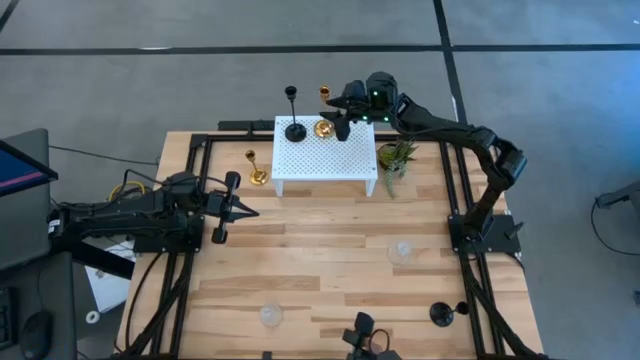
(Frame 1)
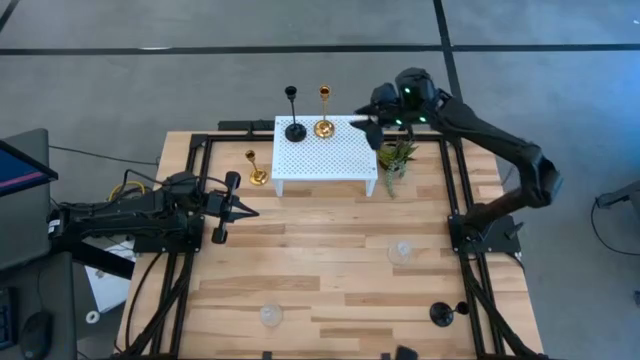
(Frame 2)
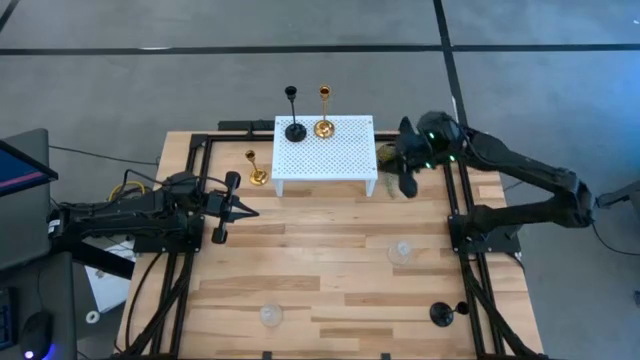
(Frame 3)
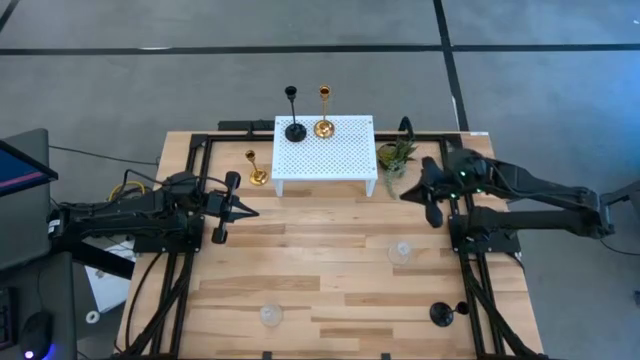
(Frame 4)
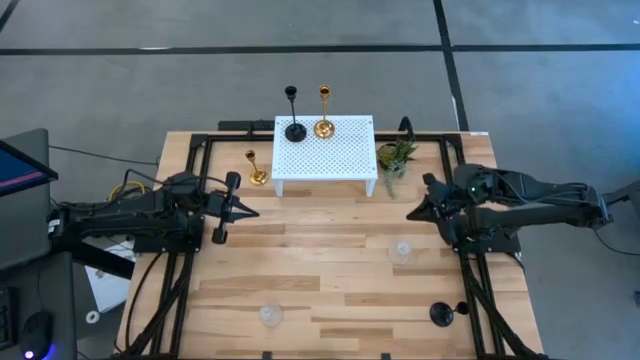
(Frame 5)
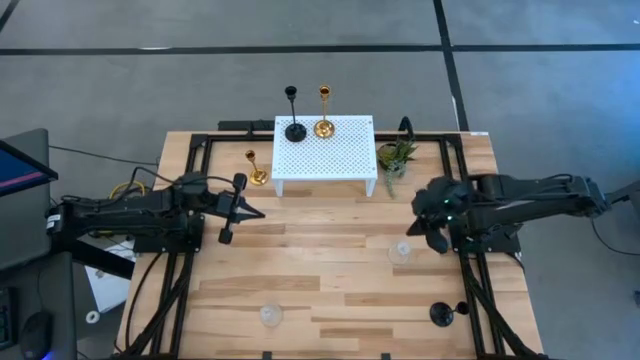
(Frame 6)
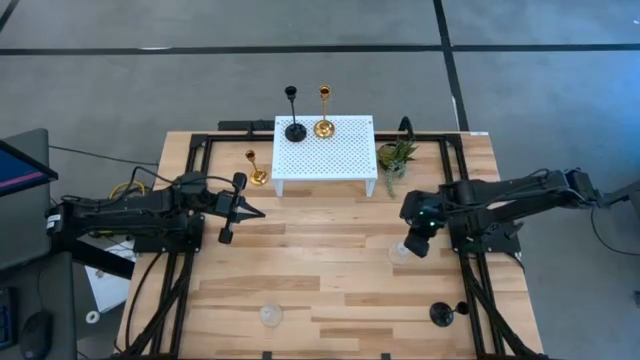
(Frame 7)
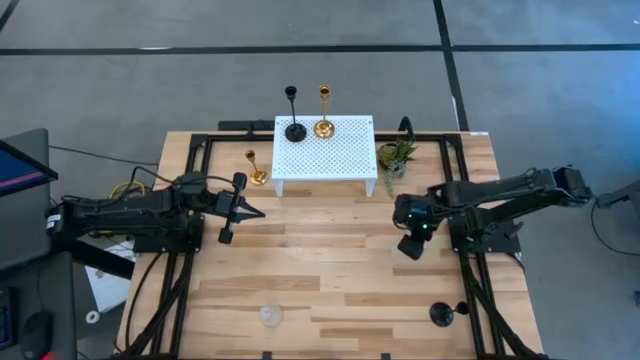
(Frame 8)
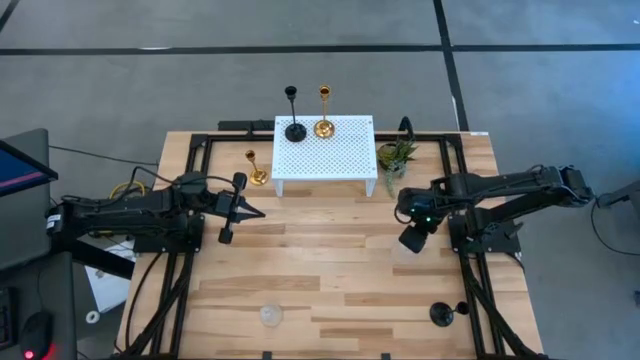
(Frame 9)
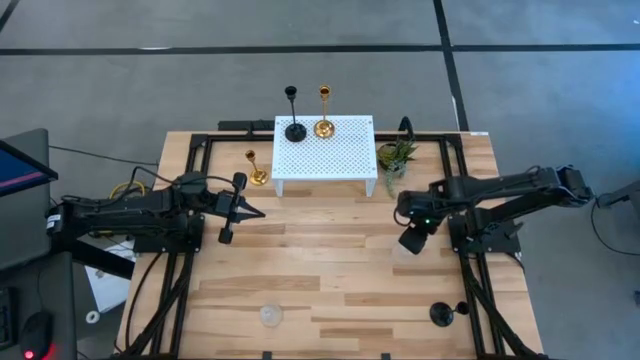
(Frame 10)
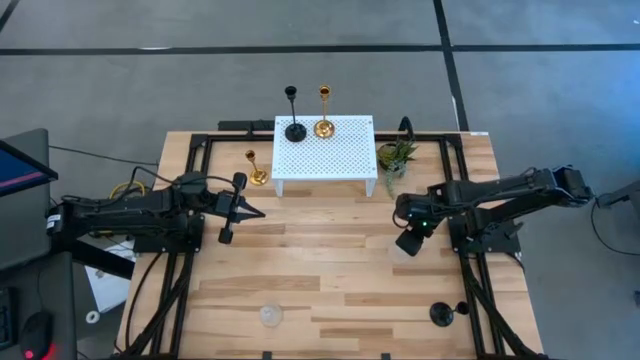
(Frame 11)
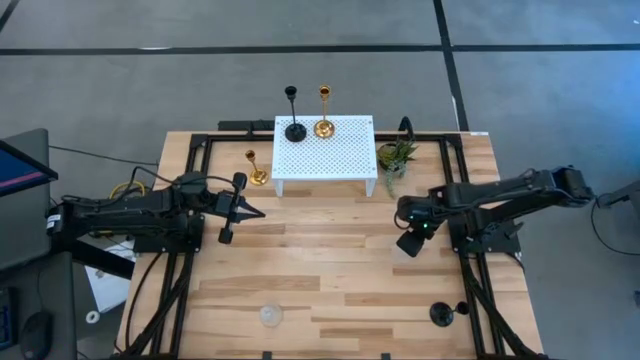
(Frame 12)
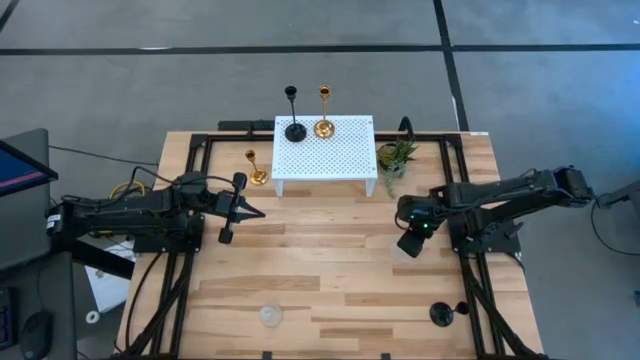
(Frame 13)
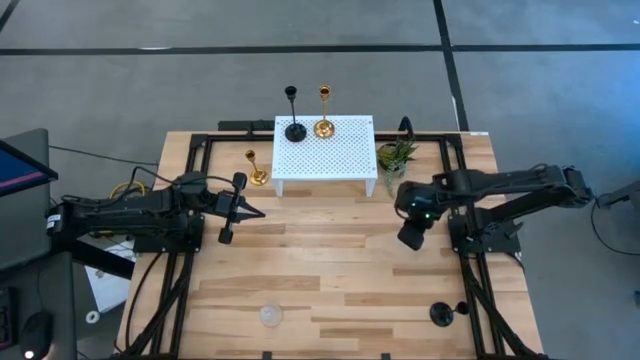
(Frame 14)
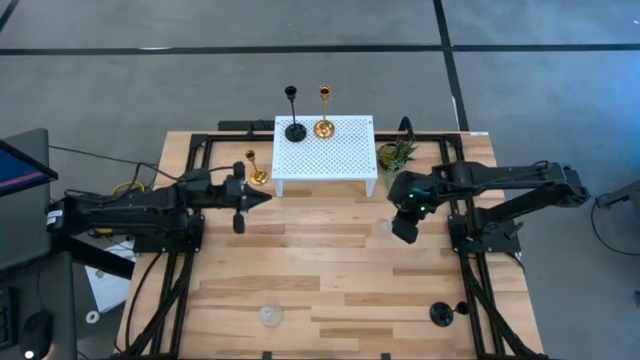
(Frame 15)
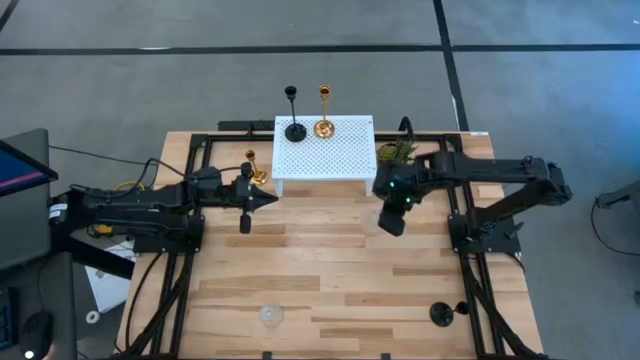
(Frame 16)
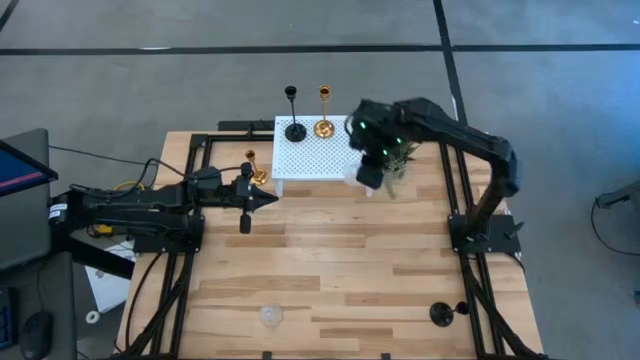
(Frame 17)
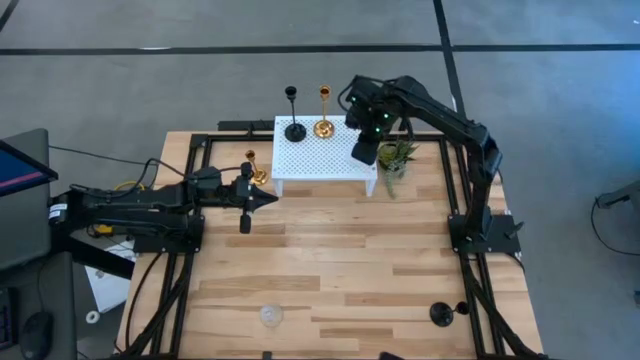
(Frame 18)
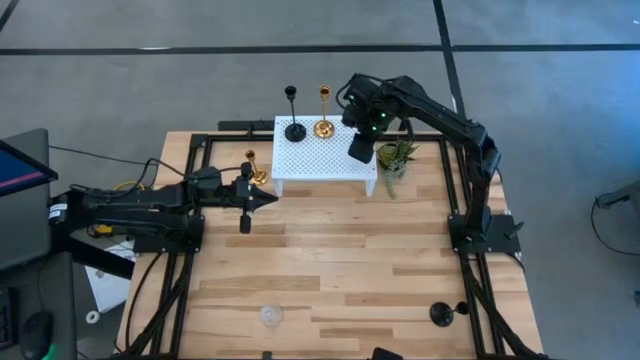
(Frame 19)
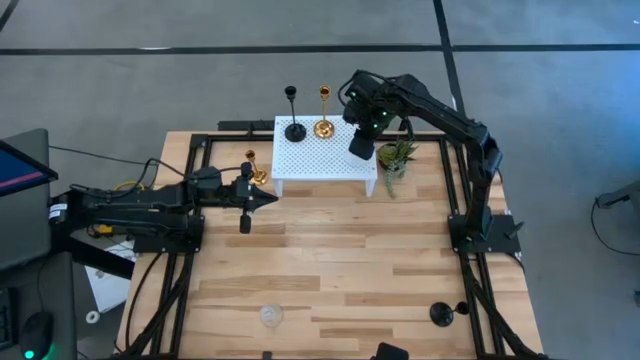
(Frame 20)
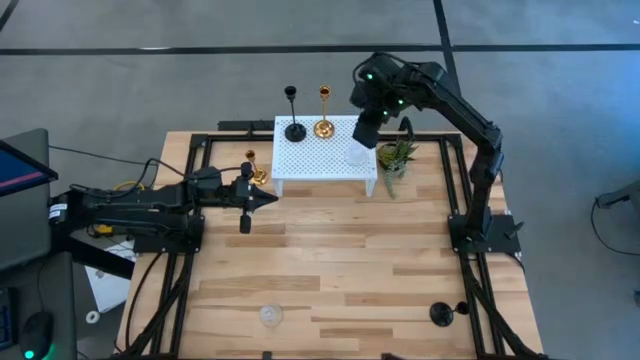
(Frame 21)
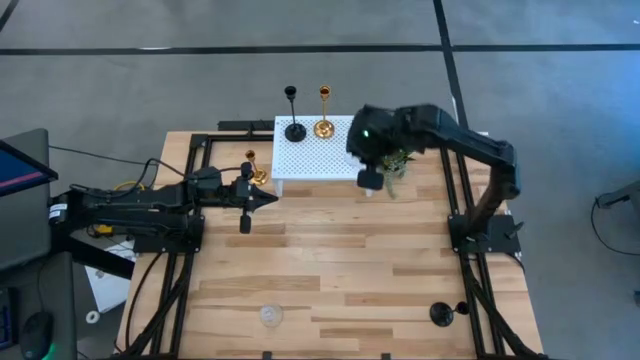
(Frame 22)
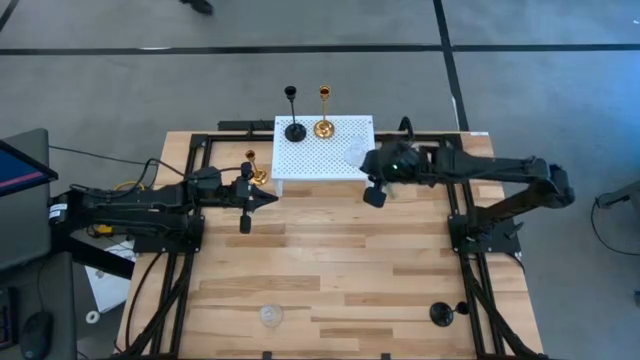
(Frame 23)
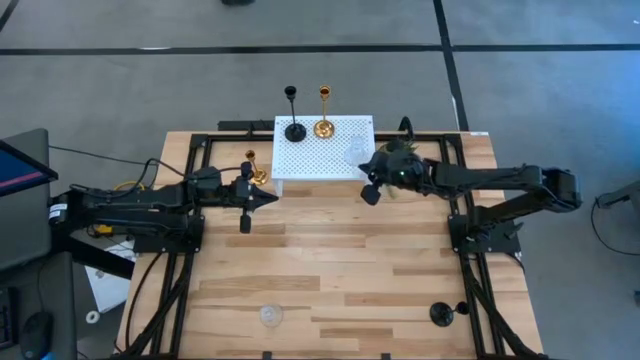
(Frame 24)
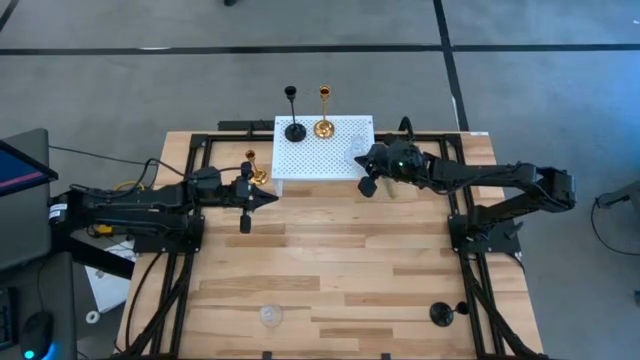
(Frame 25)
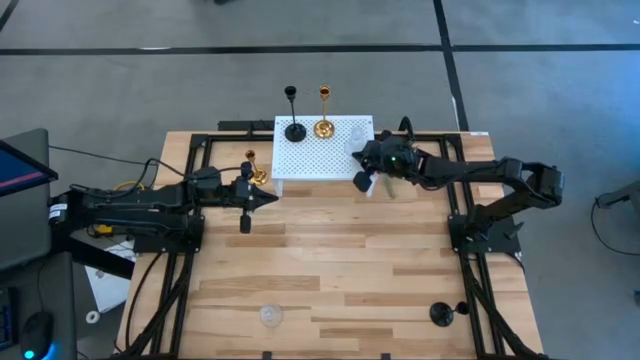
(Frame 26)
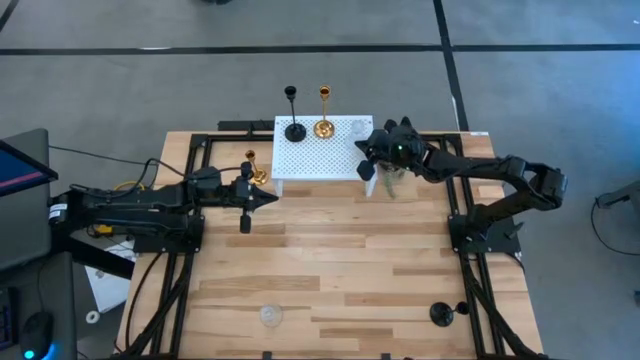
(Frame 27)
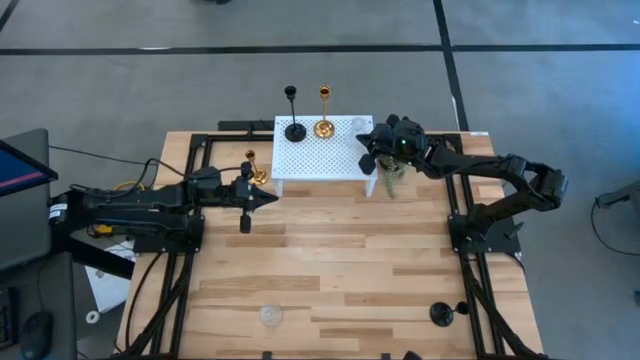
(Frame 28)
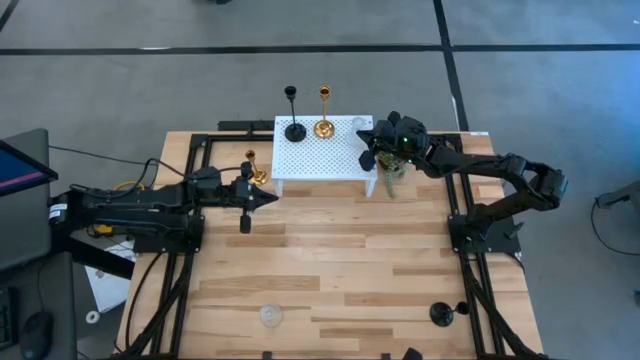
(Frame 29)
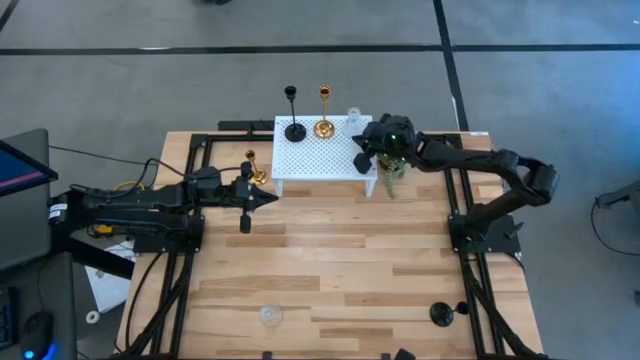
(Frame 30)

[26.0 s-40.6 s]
Task: Pick & Place candle stick holders
Put the top transparent candle holder on the shelf

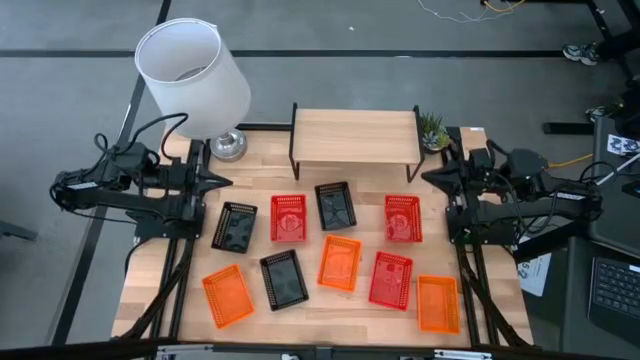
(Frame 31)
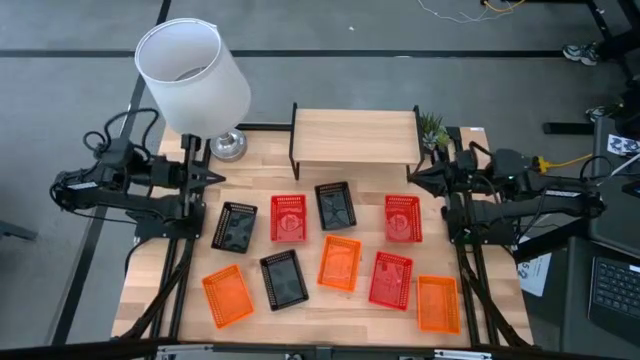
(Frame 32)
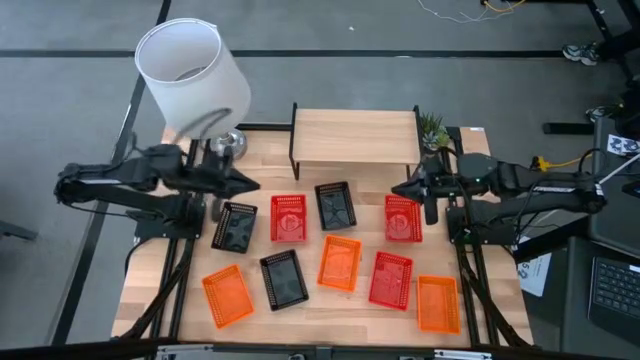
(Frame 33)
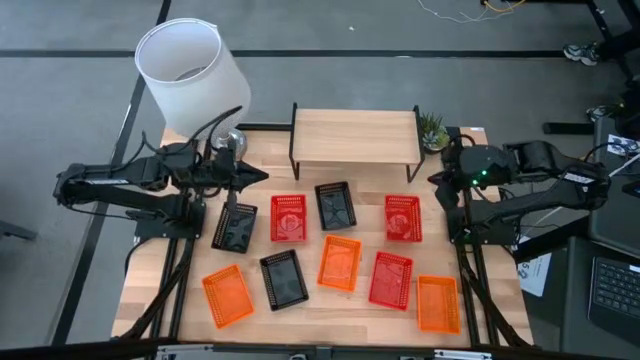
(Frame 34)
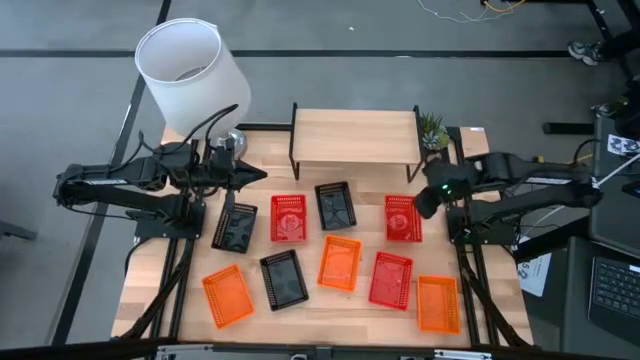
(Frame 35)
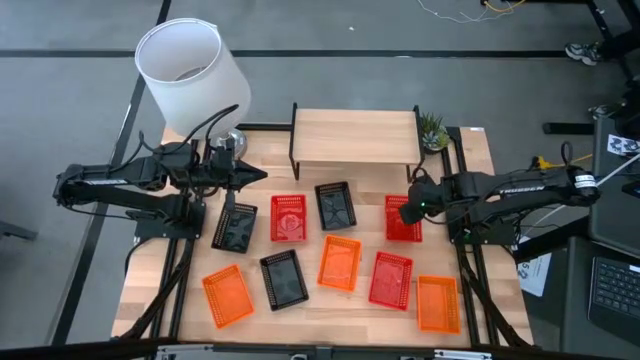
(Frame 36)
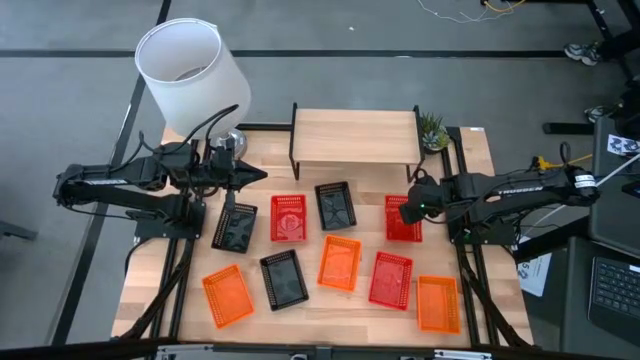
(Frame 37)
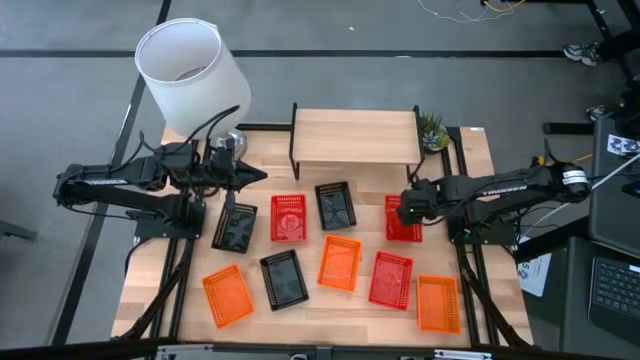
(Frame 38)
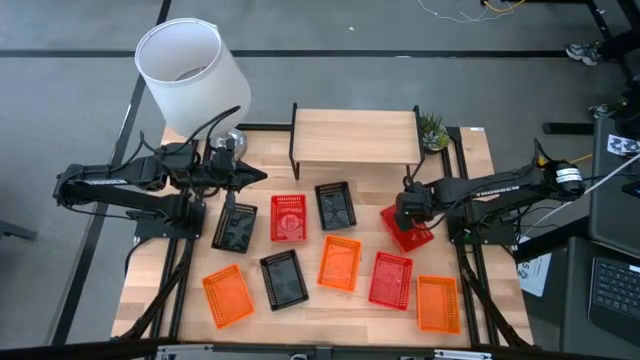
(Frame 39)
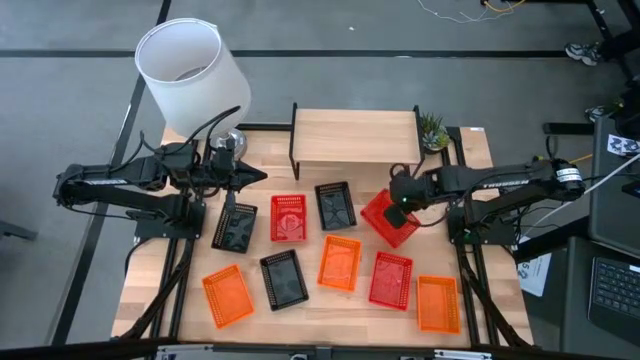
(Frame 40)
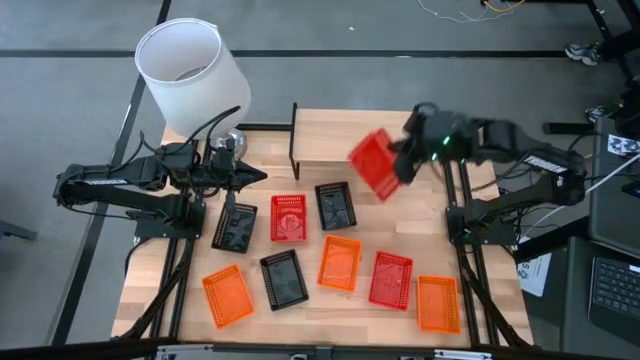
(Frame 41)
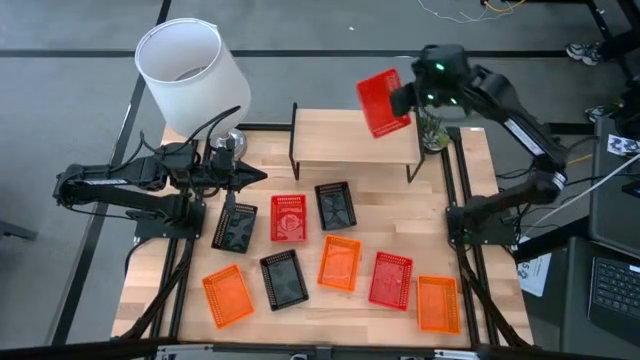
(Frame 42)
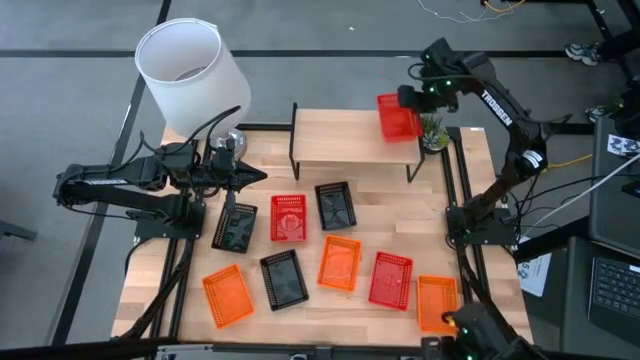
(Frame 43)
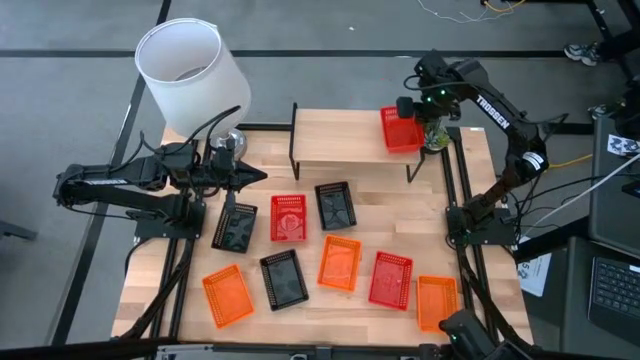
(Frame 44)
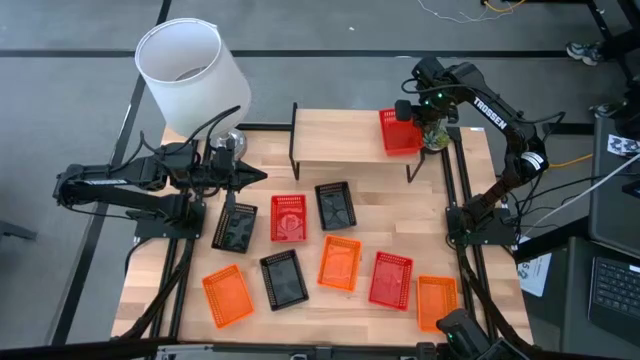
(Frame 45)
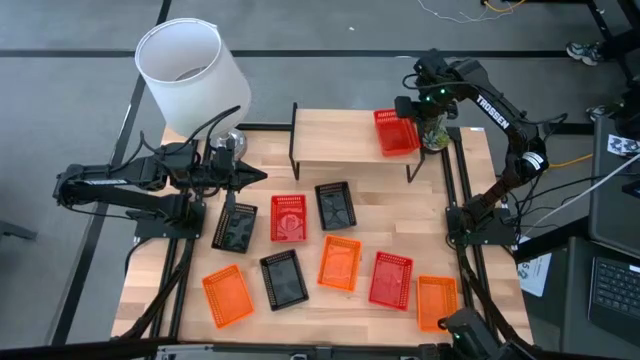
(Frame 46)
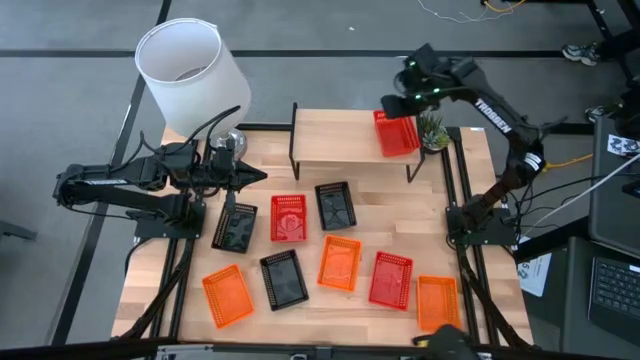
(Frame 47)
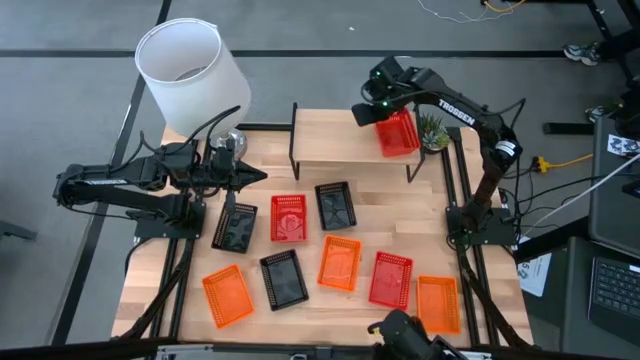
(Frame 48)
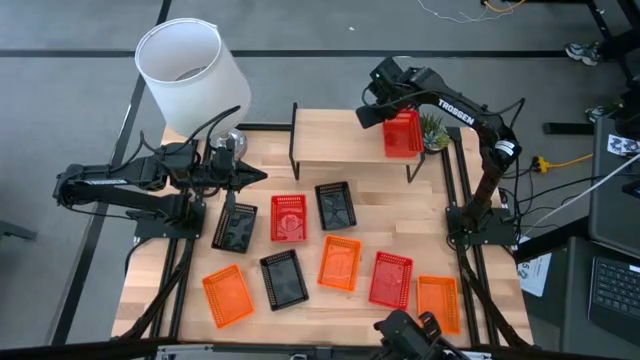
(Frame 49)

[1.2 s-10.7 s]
Task: Stack baskets on shelf by color
Put the top right red basket on the shelf
